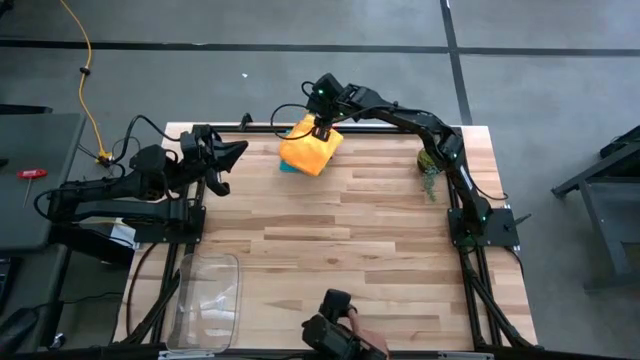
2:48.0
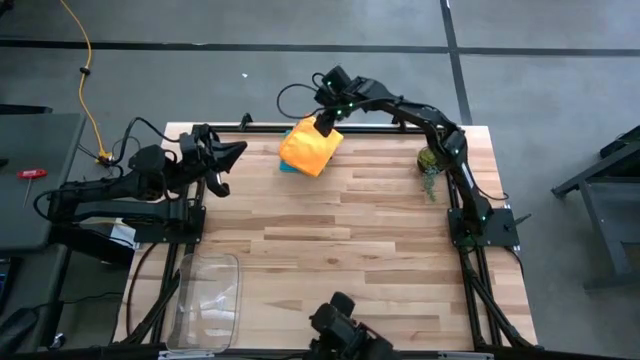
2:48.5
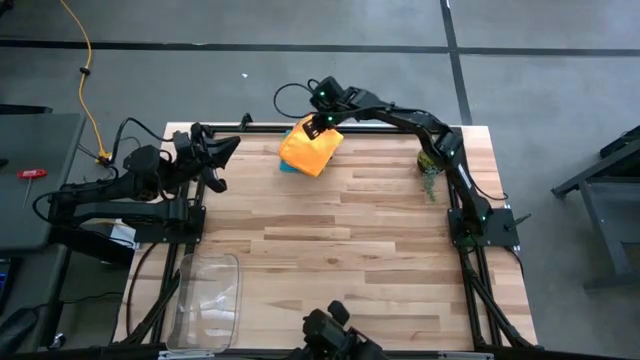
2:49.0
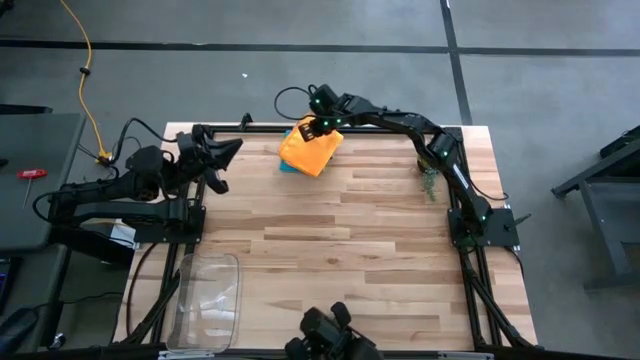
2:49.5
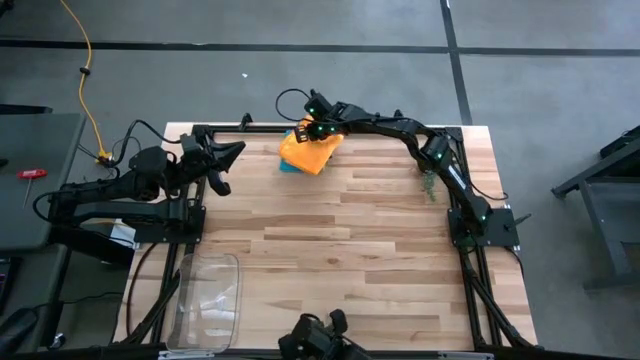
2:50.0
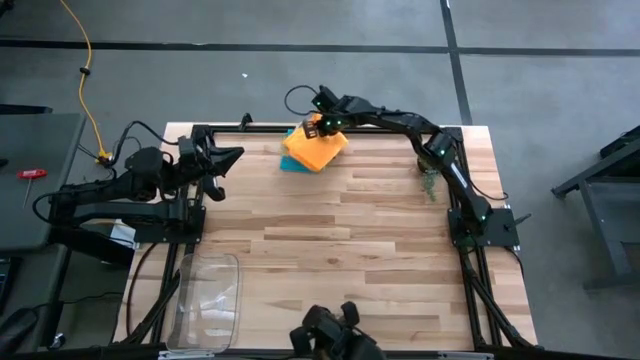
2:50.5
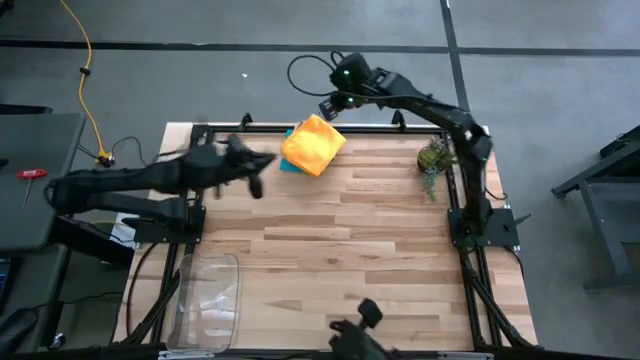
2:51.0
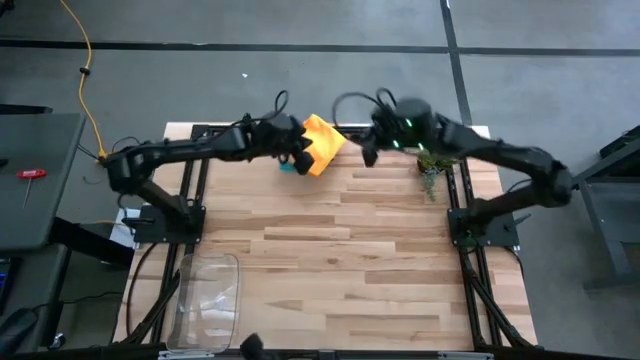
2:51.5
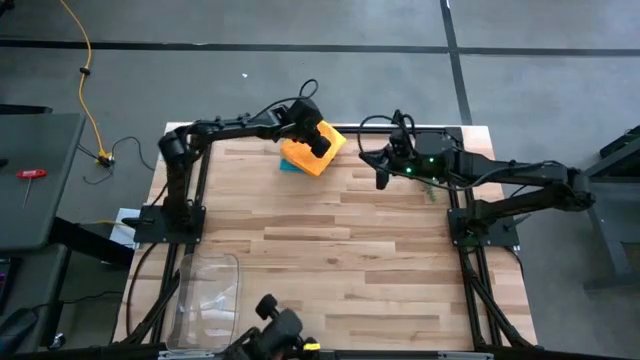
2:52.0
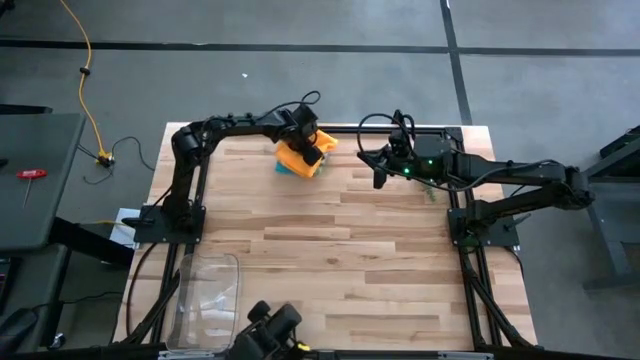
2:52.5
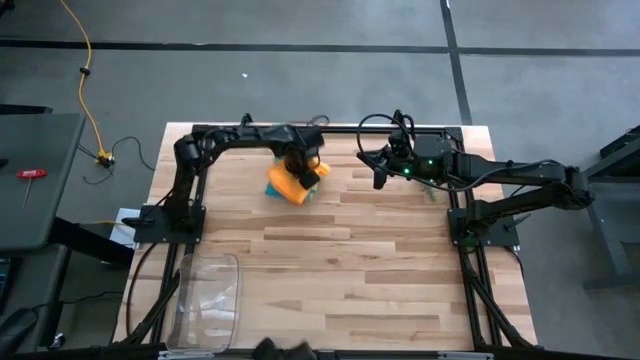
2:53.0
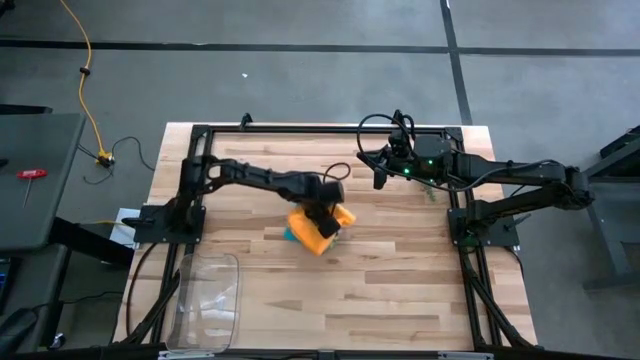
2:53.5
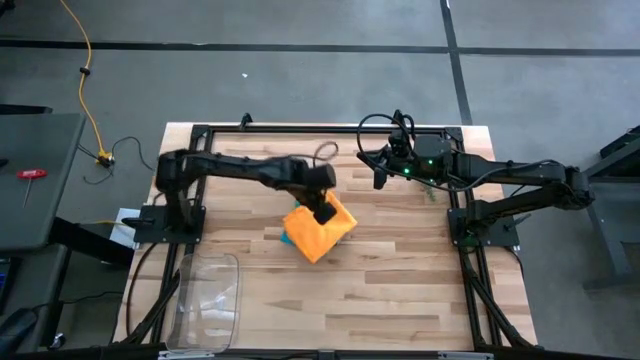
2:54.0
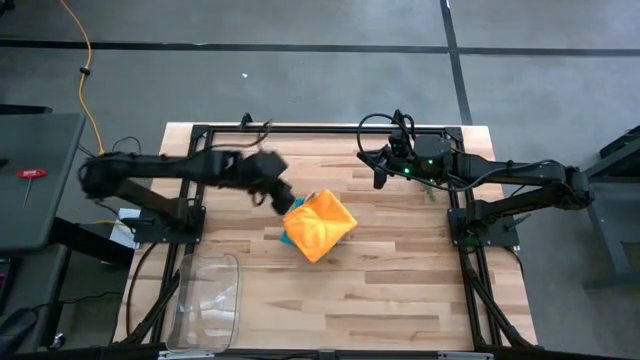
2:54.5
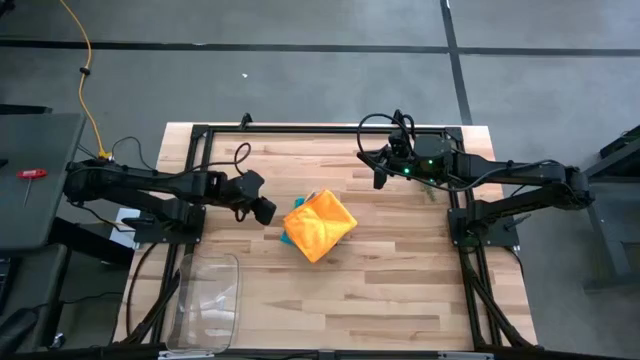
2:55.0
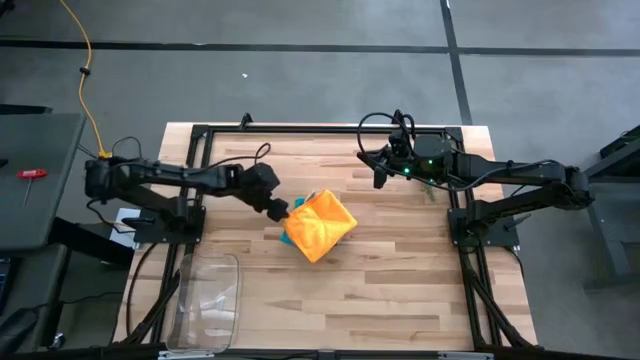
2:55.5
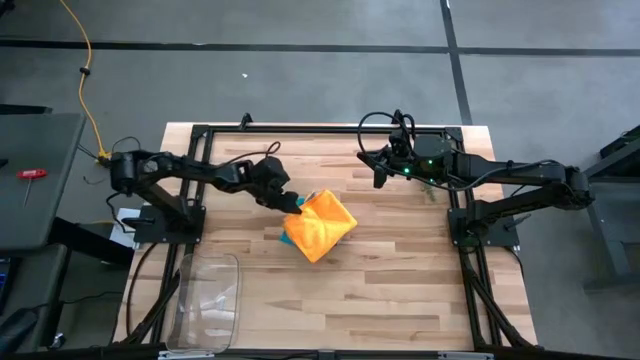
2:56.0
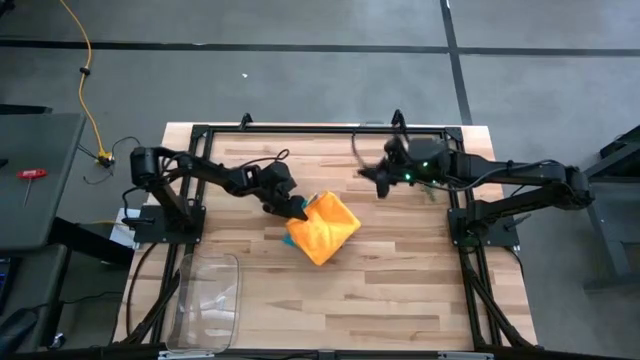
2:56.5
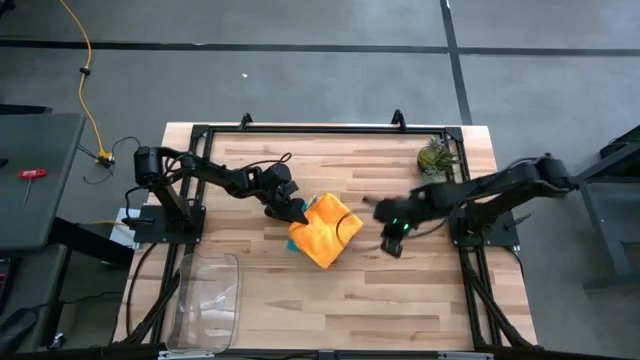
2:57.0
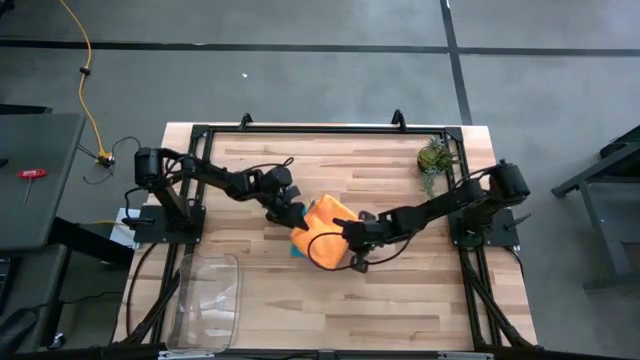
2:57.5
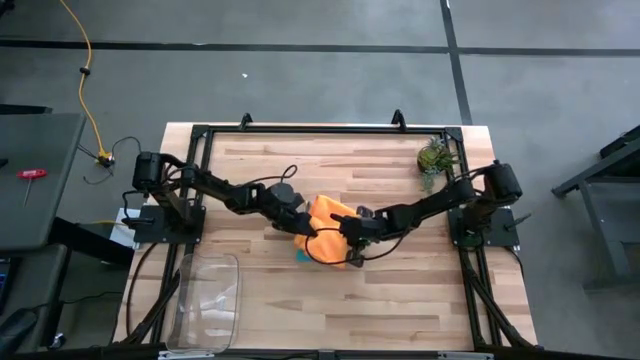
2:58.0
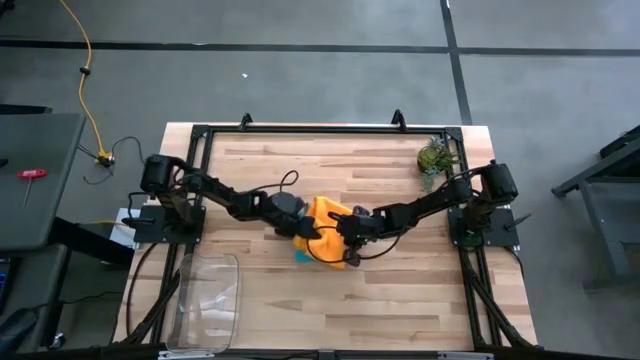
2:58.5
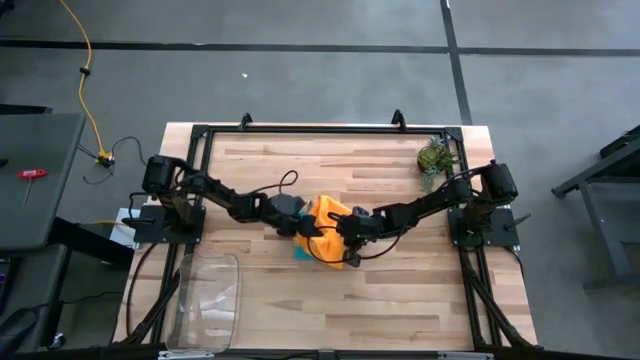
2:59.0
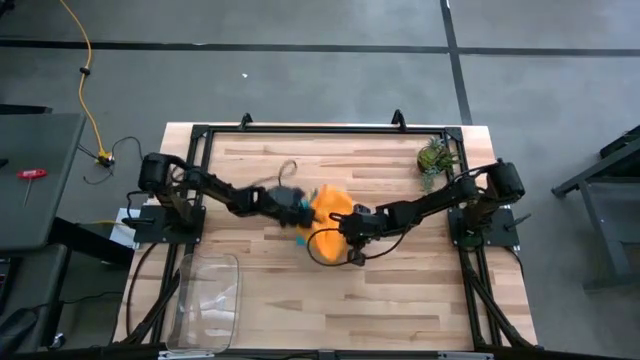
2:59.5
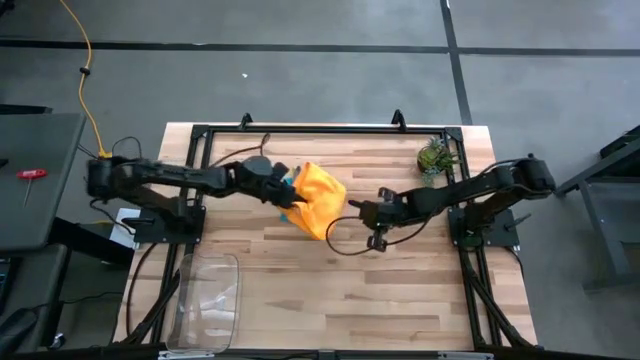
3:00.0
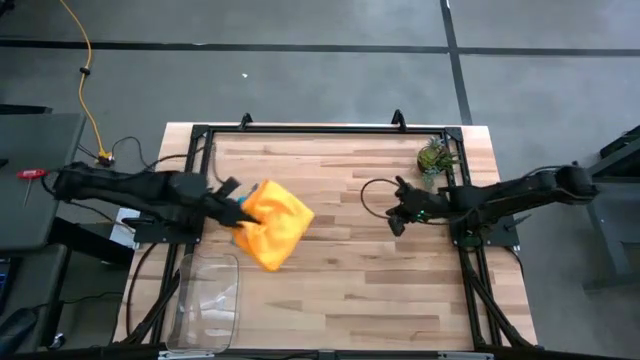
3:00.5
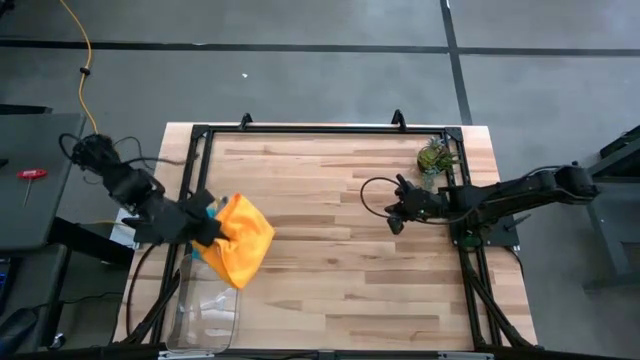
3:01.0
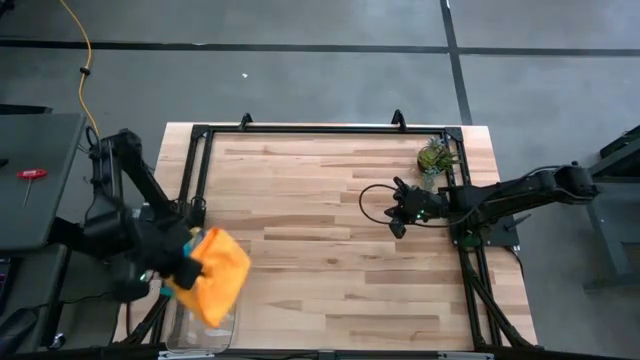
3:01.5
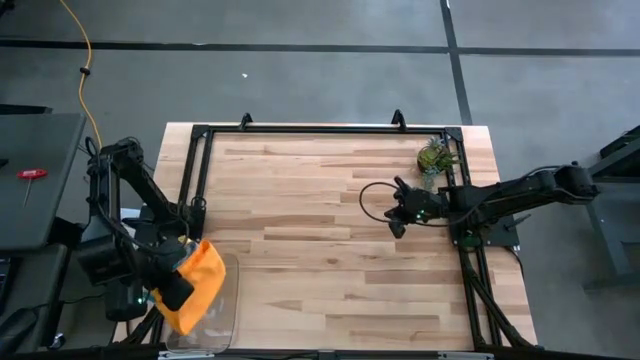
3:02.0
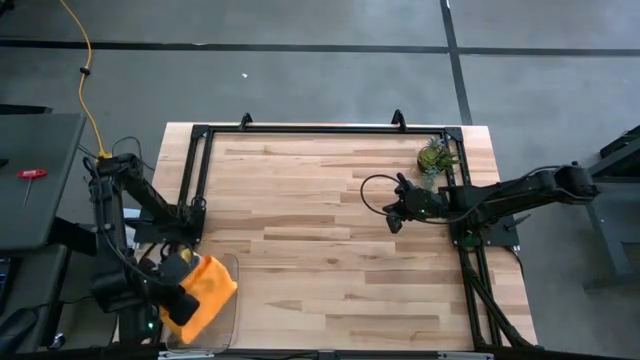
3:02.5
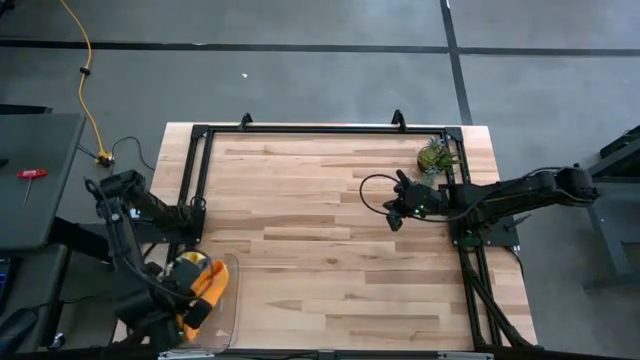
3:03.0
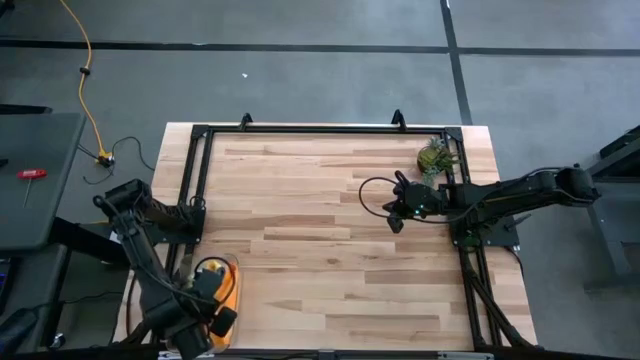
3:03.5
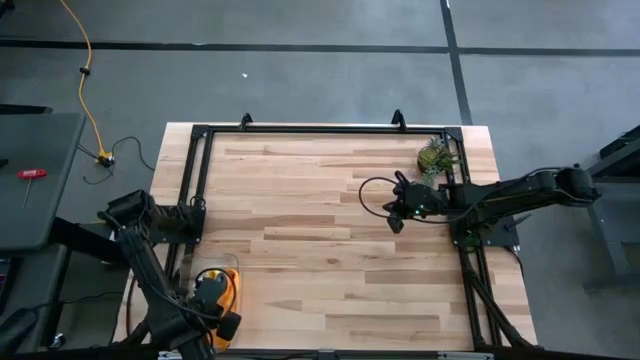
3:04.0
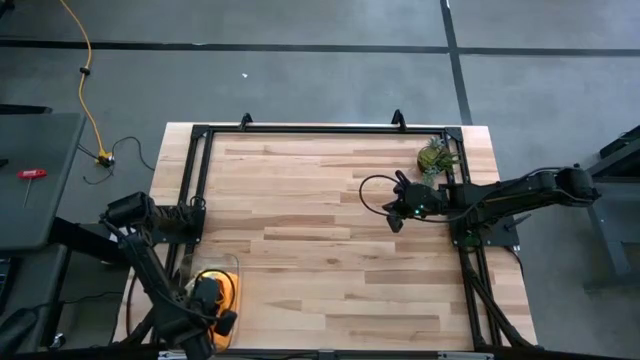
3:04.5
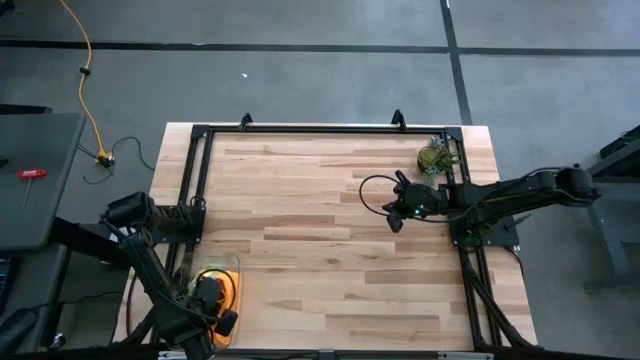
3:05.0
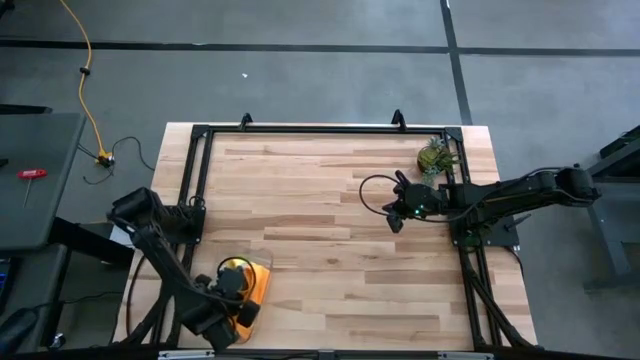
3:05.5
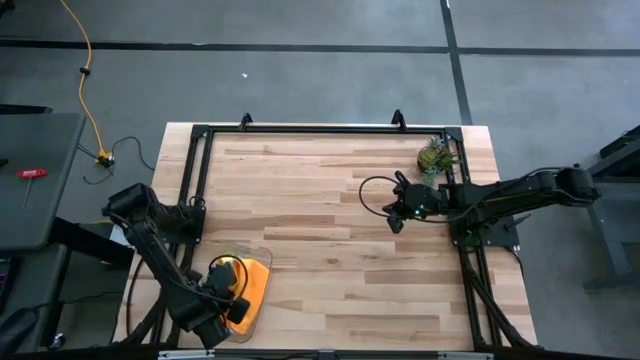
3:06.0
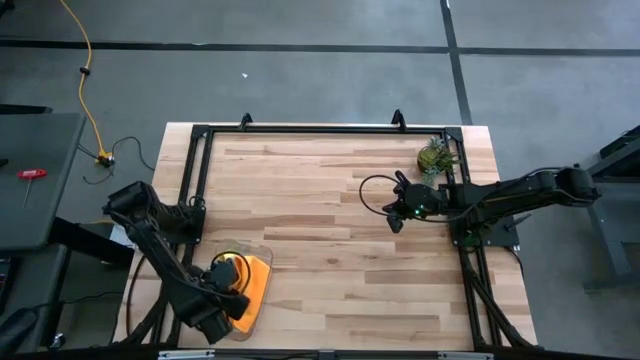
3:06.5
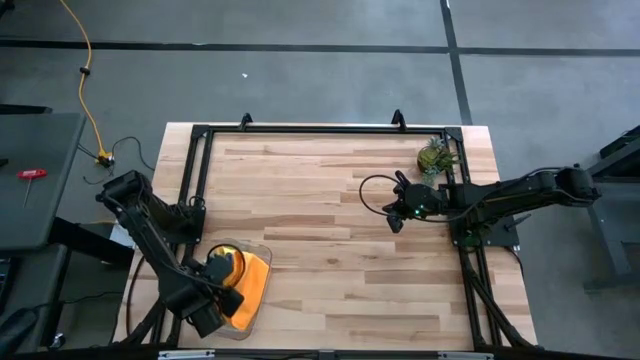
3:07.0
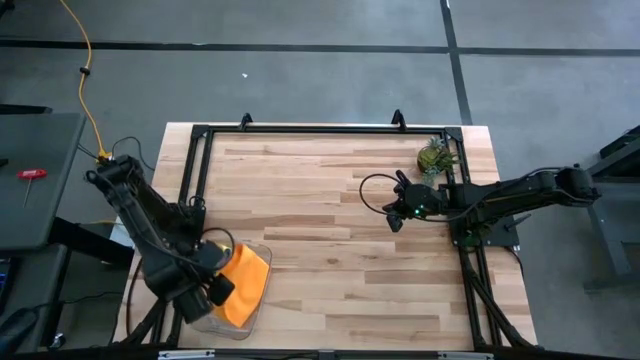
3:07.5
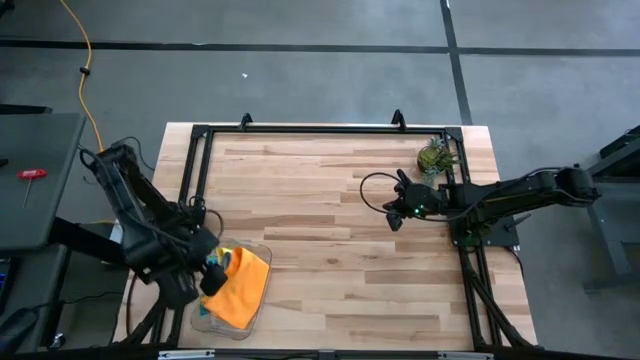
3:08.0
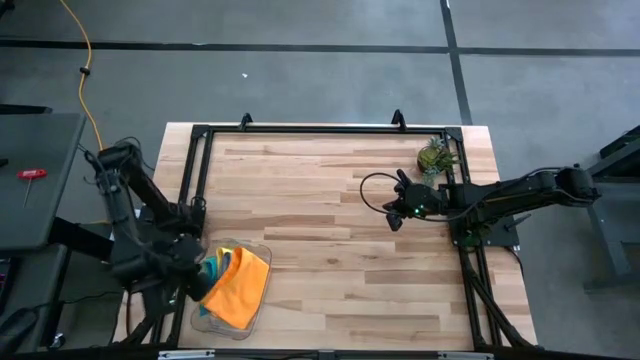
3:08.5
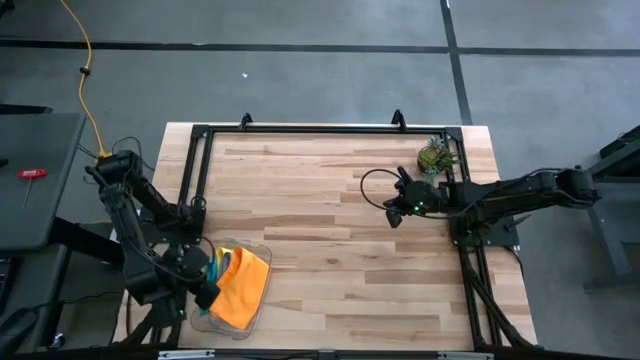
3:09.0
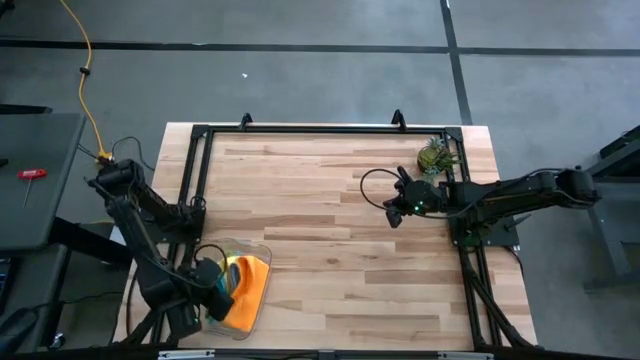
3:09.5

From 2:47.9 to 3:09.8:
Task: Fold microfiber towels
Put the folded microfiber towels into the transparent bin
